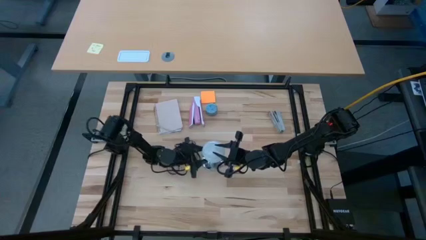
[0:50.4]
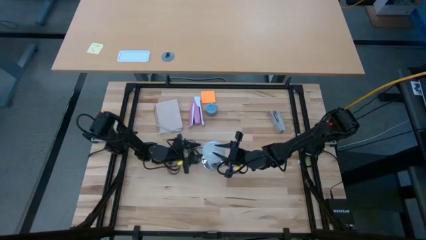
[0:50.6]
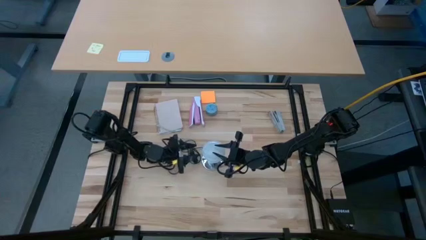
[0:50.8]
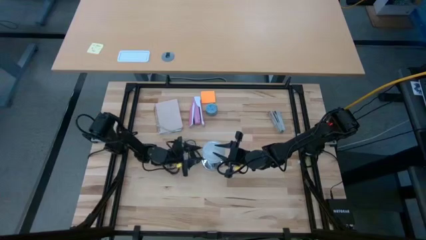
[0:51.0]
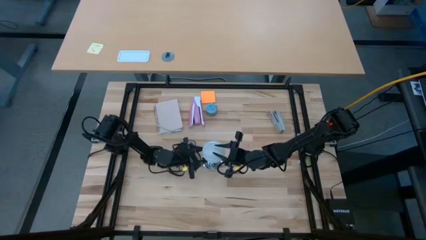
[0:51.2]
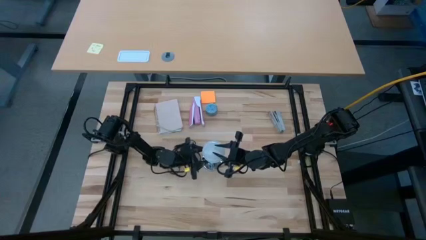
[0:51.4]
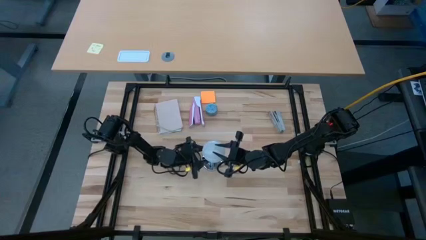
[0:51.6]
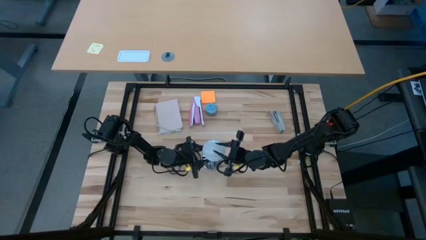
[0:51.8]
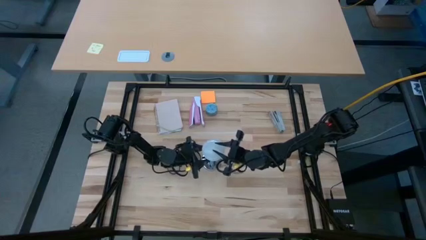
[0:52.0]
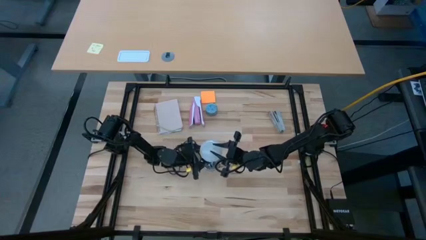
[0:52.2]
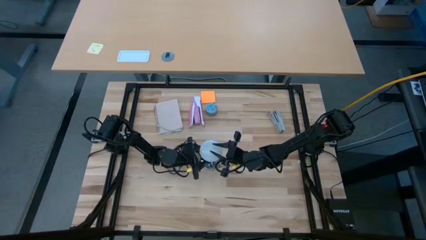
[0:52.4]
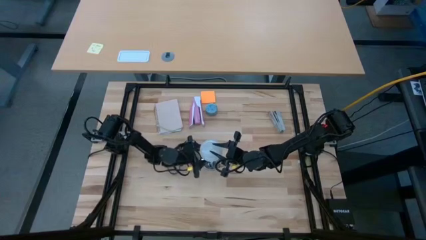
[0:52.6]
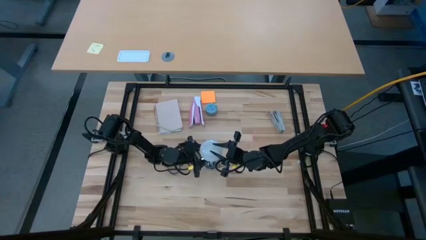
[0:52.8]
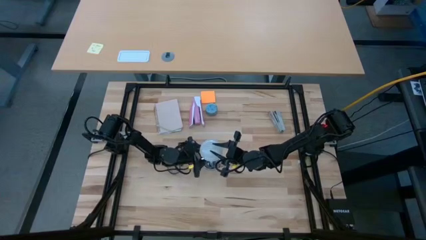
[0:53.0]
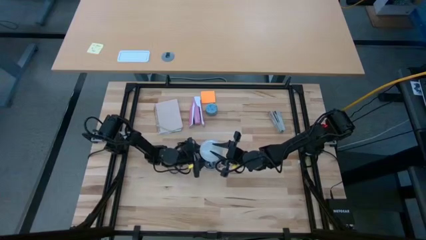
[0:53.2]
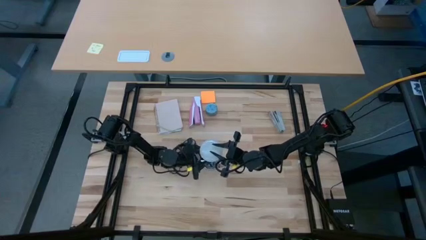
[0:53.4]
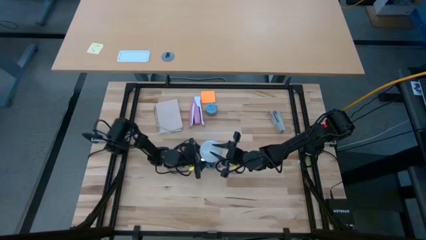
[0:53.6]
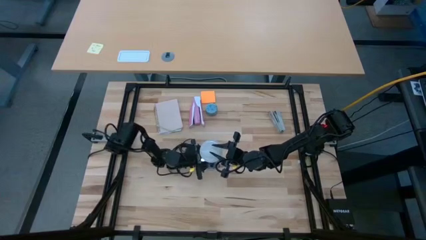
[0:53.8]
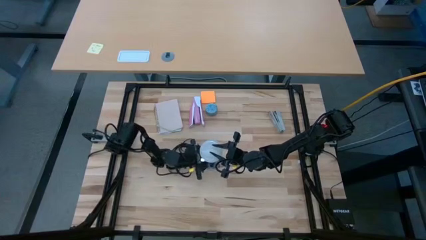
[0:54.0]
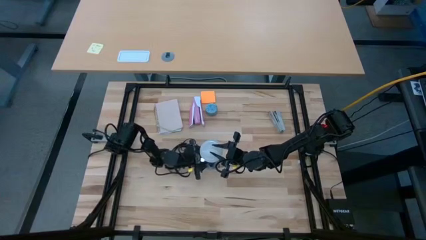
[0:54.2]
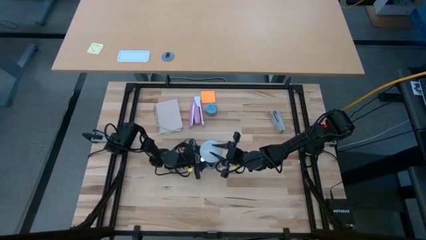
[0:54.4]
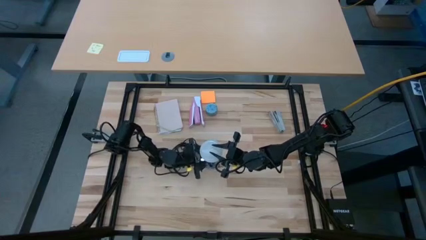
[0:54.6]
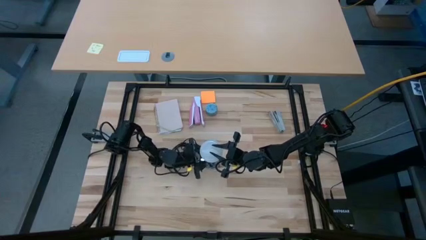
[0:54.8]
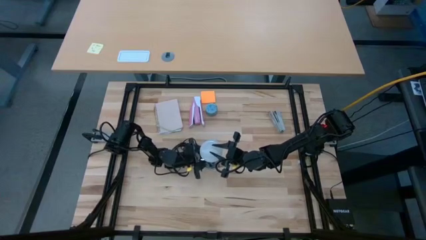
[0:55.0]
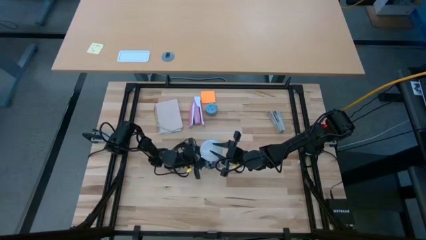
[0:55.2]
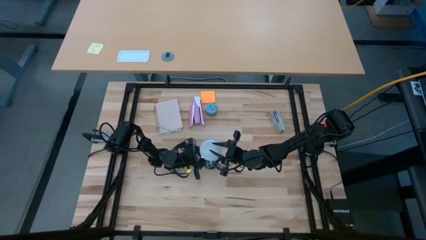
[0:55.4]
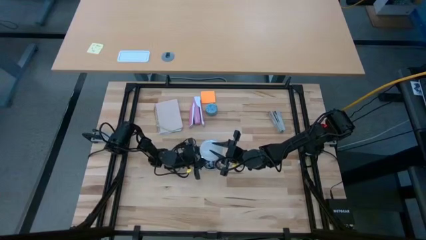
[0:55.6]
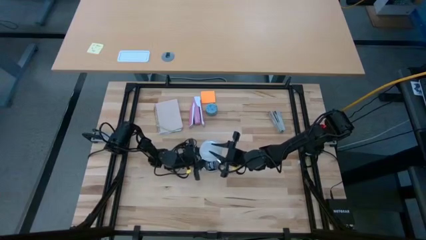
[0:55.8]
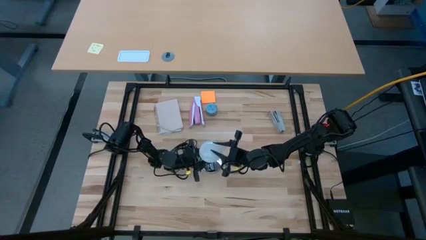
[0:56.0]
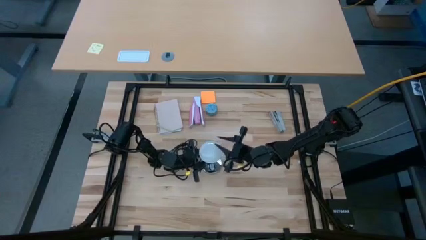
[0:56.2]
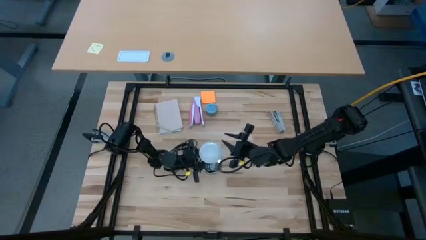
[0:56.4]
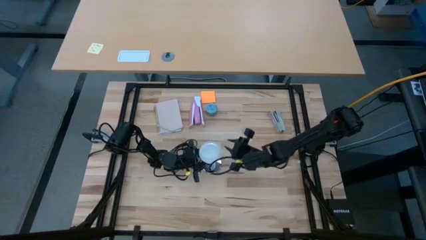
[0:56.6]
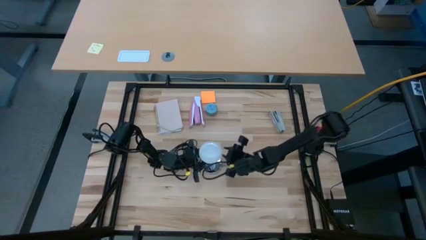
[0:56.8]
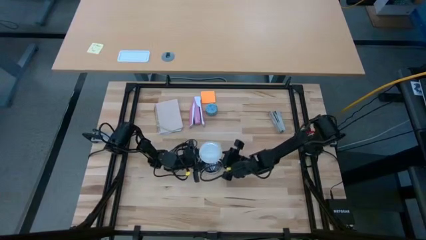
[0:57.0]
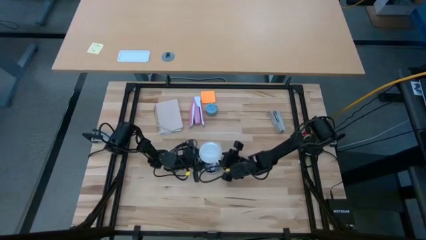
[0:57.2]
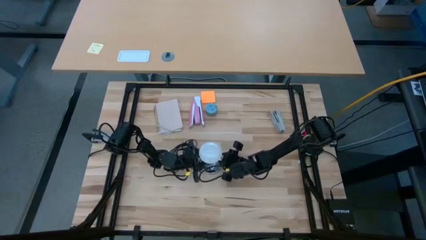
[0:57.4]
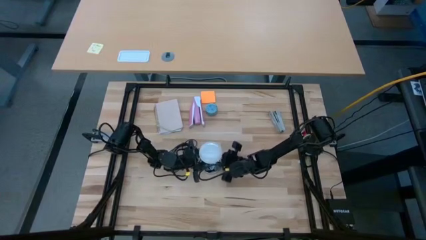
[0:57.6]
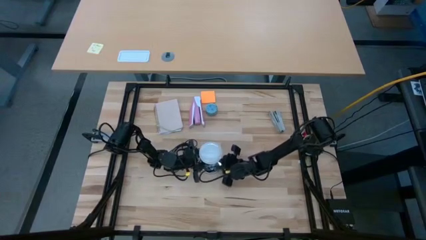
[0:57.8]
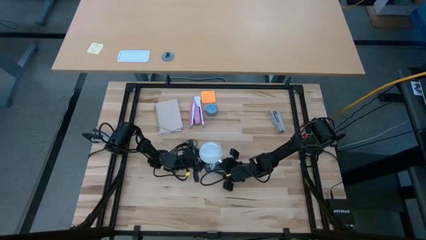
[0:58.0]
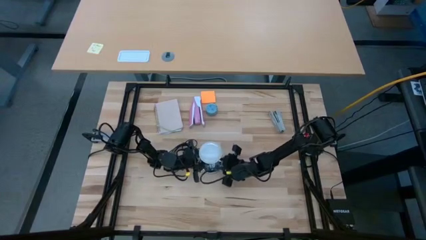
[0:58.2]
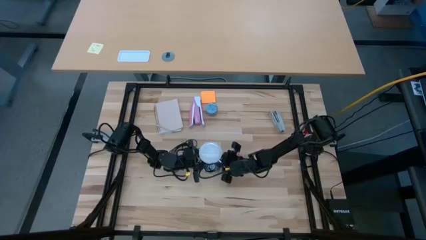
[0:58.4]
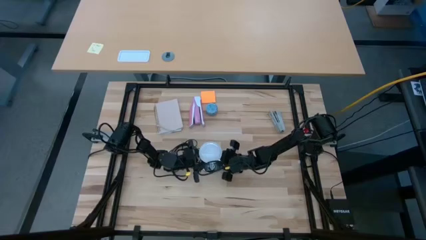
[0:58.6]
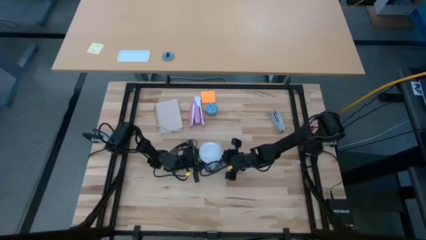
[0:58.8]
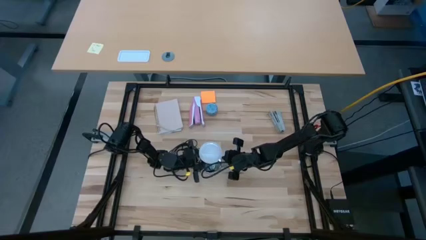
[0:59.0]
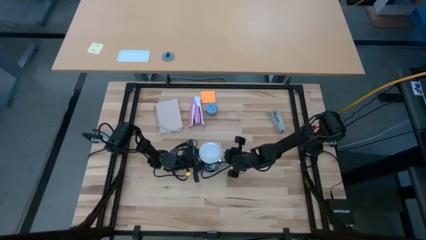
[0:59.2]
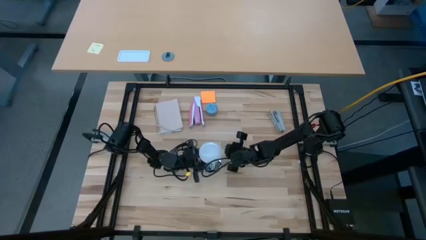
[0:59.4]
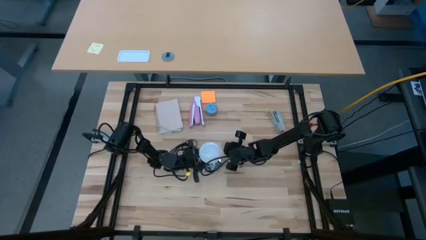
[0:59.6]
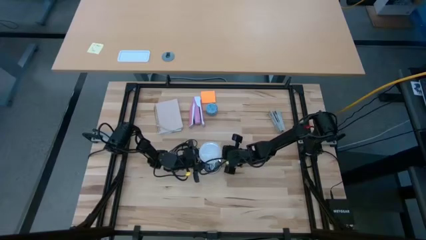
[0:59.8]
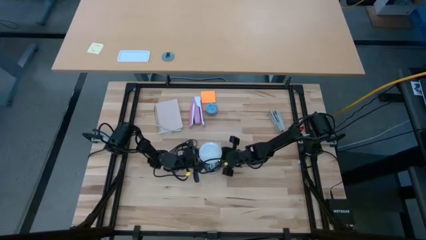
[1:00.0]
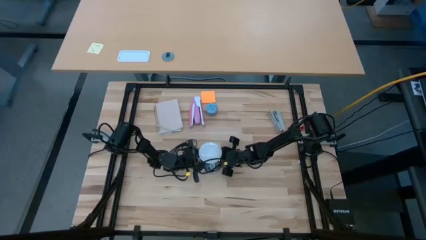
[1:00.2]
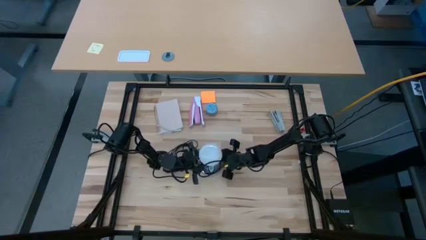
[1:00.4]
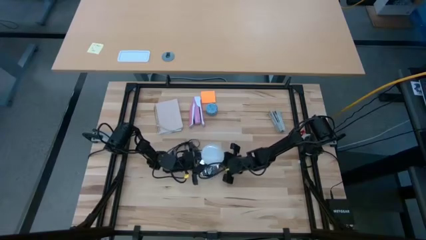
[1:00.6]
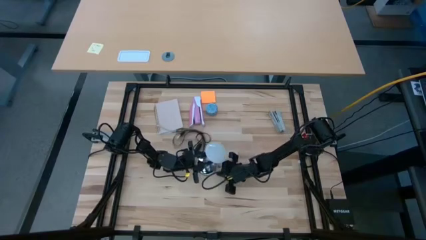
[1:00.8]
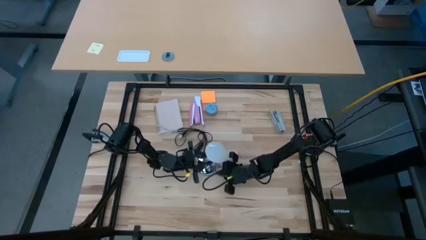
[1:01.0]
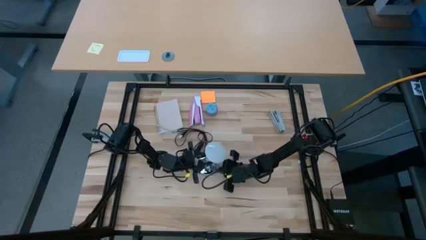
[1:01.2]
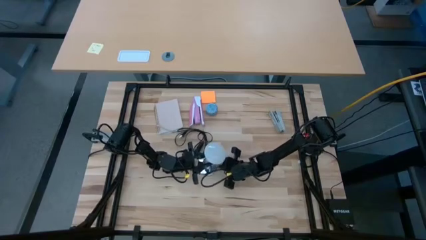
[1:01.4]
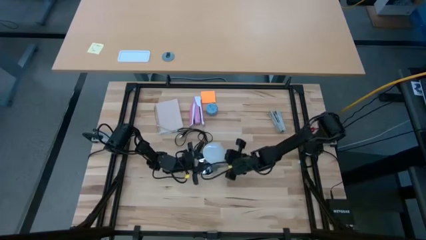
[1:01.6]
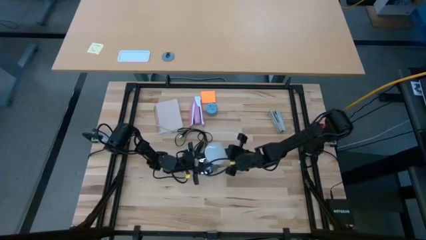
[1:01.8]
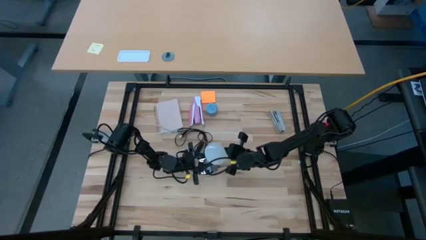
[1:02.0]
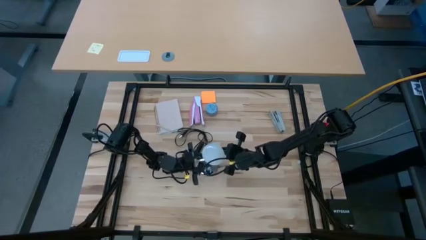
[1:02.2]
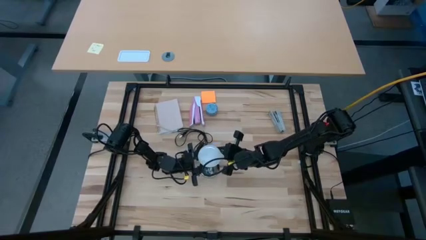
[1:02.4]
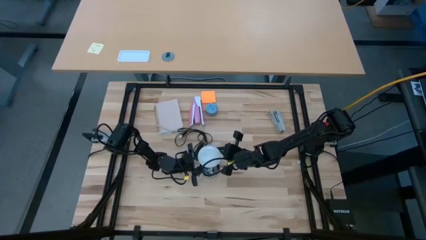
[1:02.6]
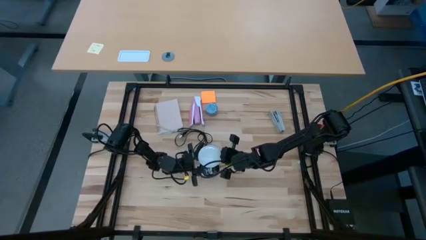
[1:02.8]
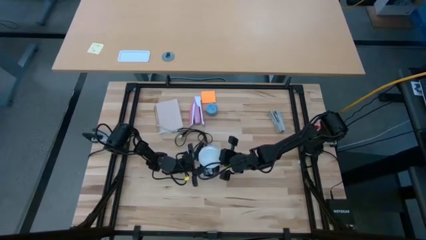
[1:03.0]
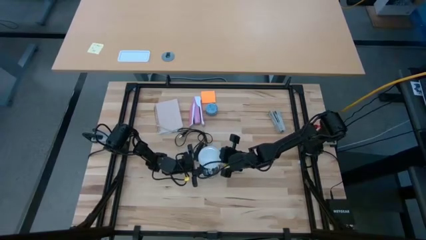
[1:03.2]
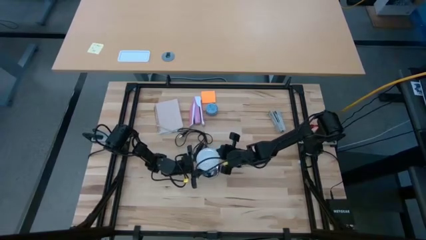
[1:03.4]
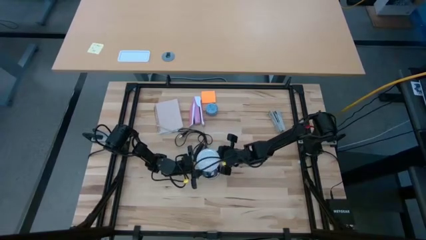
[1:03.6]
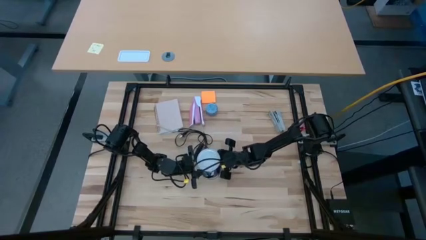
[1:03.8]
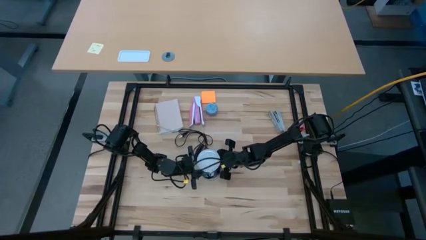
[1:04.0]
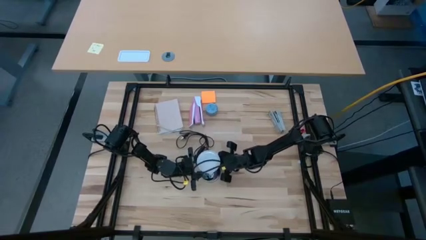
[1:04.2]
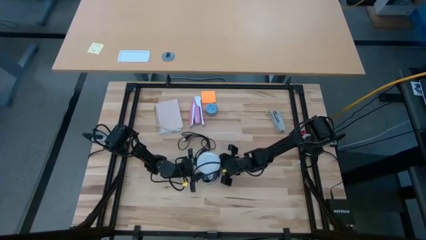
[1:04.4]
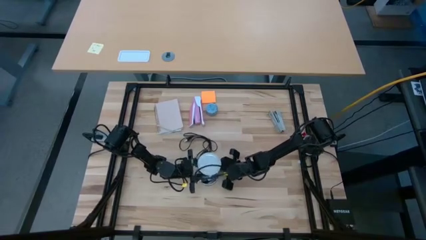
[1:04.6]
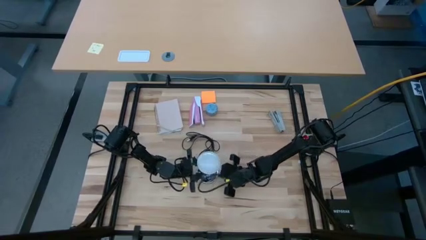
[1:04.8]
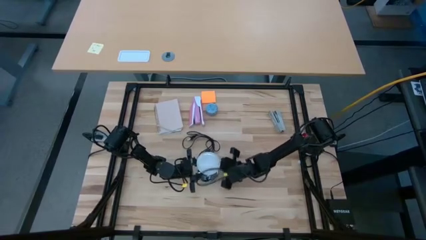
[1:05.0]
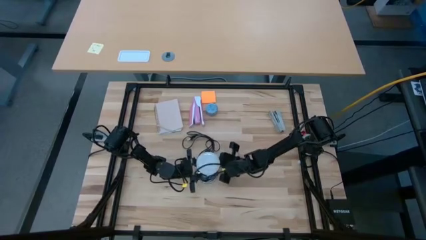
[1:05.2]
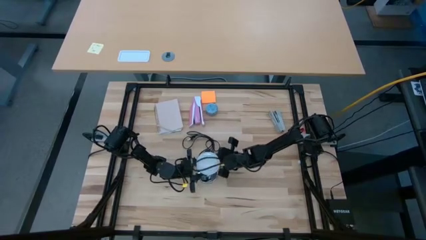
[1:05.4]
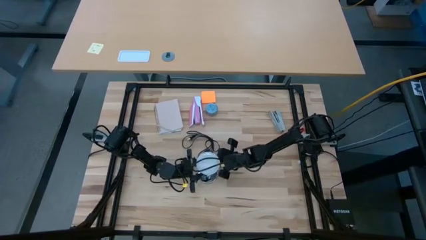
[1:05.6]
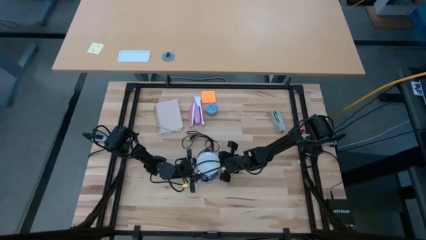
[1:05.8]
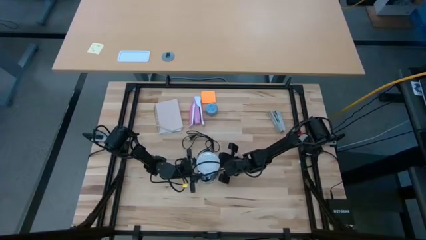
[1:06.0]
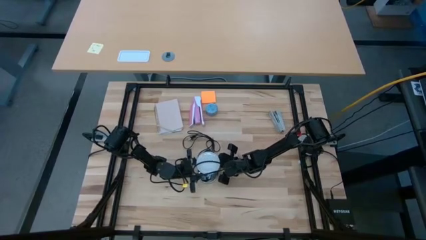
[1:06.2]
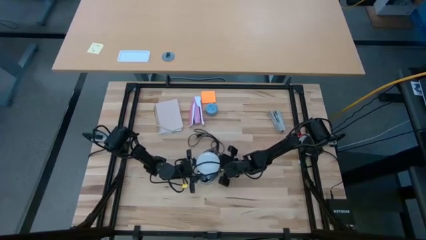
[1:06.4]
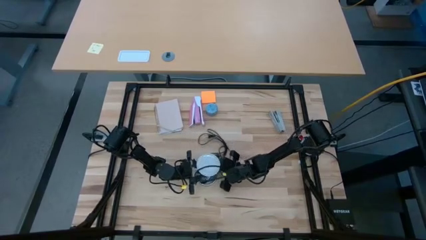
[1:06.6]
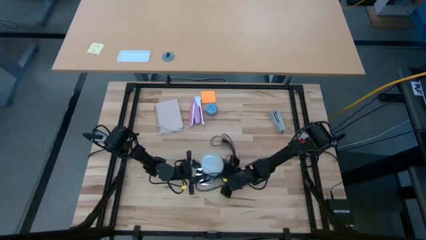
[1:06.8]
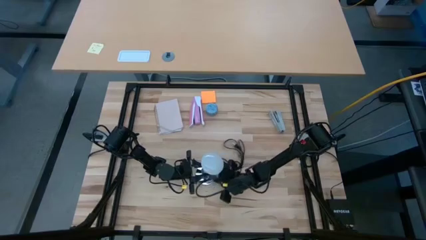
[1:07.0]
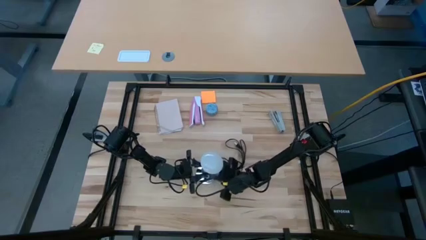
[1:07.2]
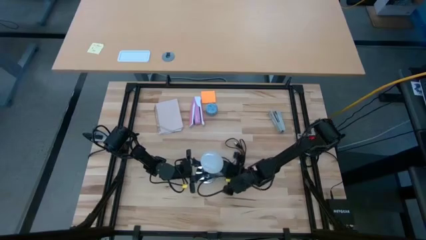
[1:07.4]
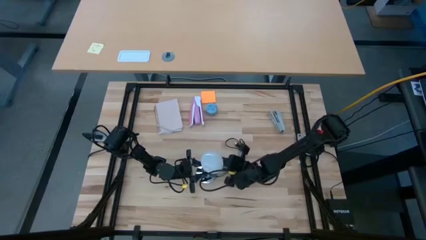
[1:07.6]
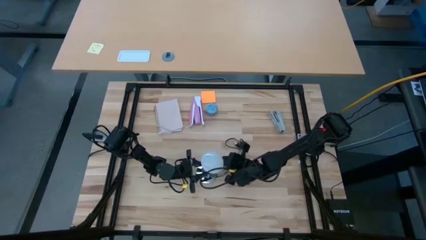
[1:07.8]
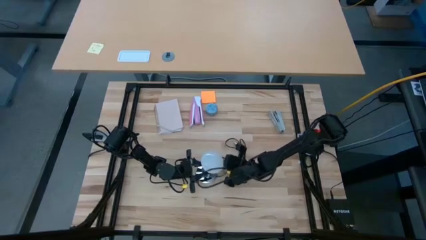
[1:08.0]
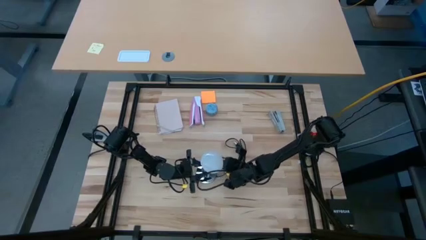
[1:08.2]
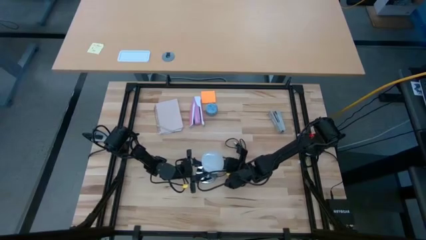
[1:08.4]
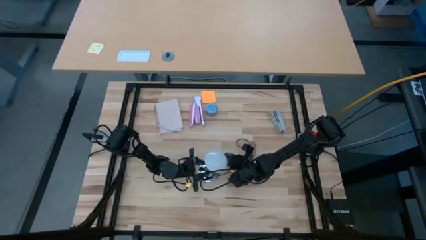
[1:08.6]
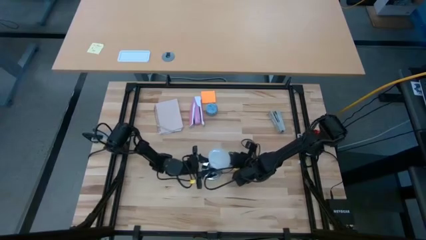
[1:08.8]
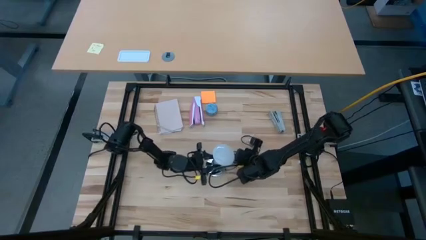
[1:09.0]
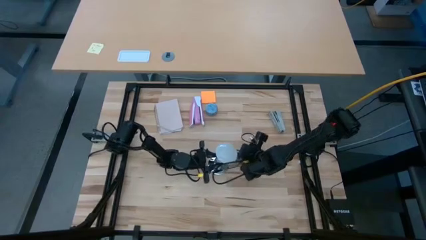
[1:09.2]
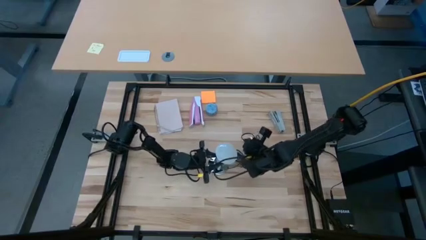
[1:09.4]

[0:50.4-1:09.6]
Task: Screw lightbulb
Insert the lightbulb into the lamp
